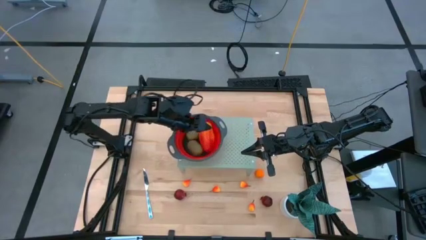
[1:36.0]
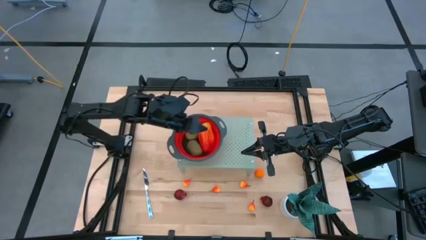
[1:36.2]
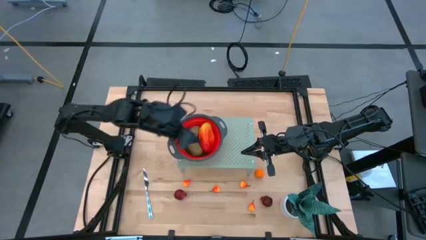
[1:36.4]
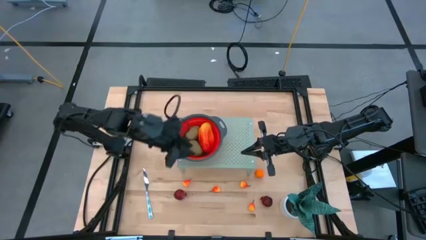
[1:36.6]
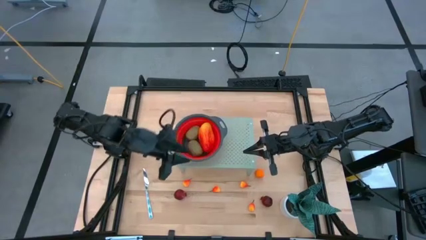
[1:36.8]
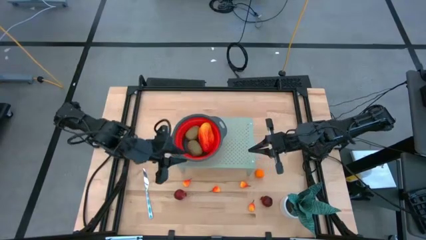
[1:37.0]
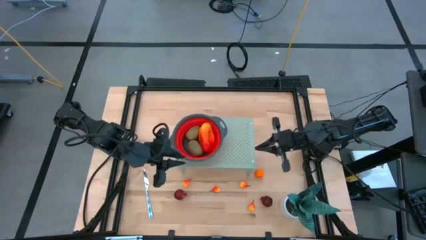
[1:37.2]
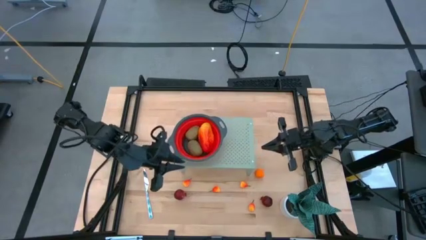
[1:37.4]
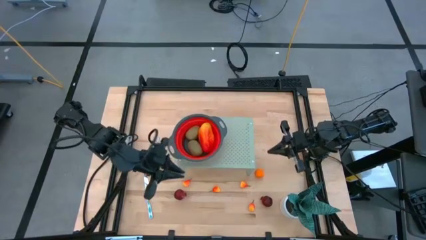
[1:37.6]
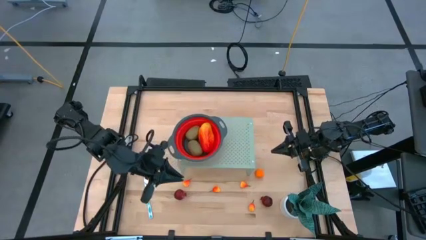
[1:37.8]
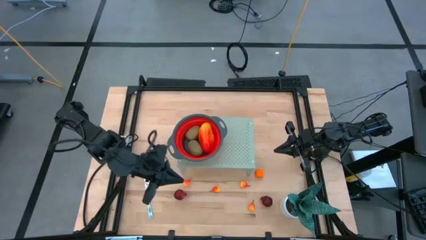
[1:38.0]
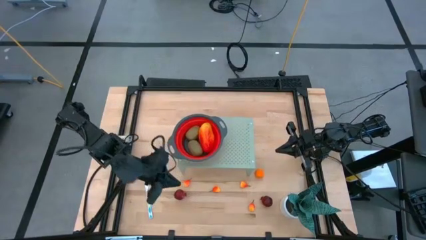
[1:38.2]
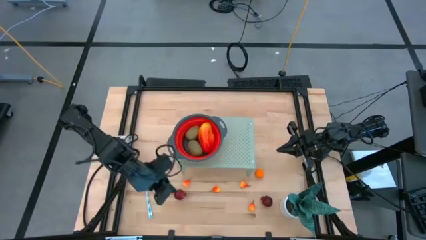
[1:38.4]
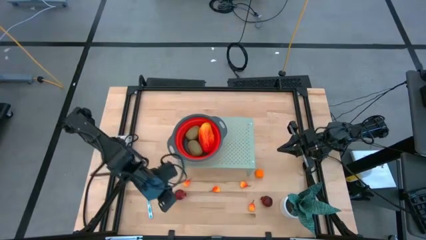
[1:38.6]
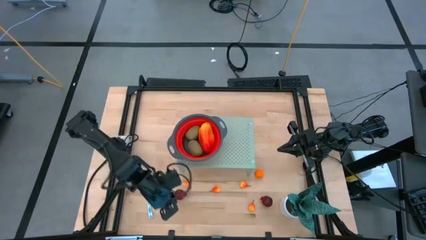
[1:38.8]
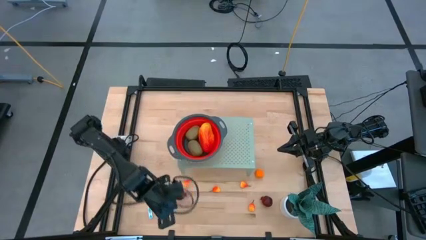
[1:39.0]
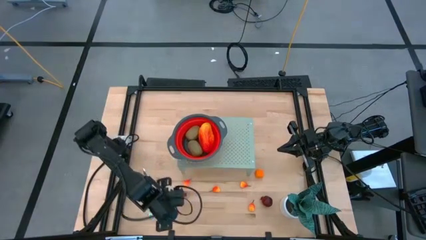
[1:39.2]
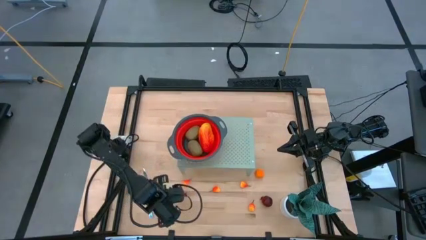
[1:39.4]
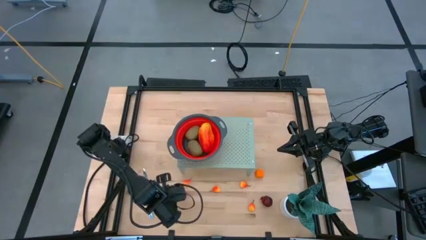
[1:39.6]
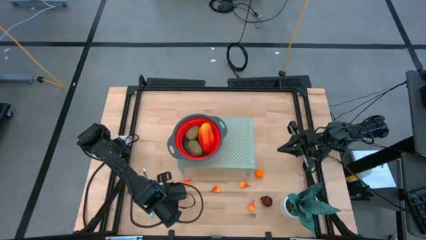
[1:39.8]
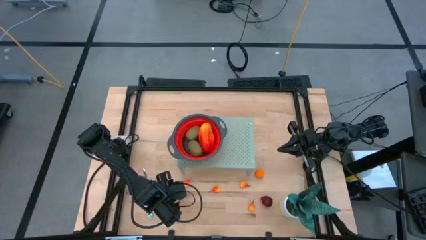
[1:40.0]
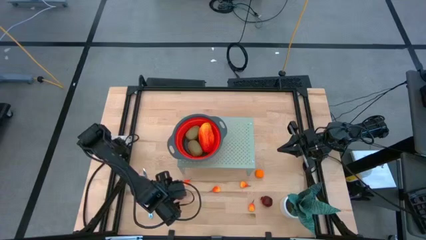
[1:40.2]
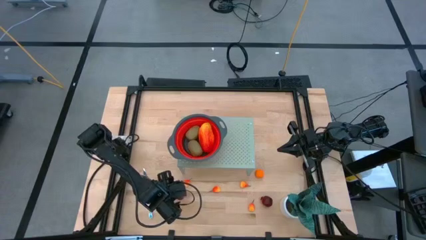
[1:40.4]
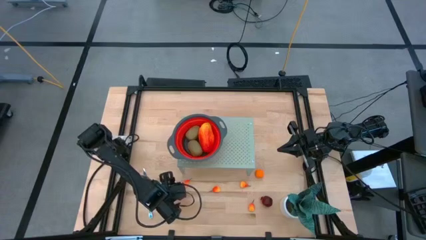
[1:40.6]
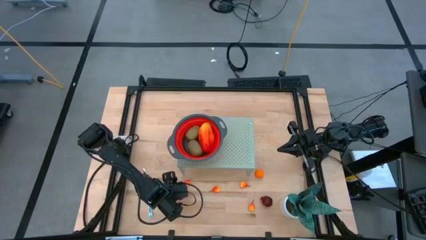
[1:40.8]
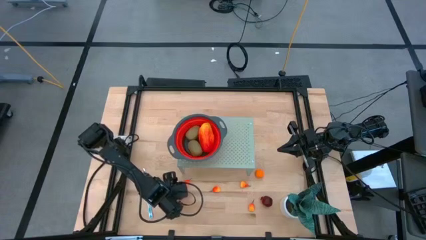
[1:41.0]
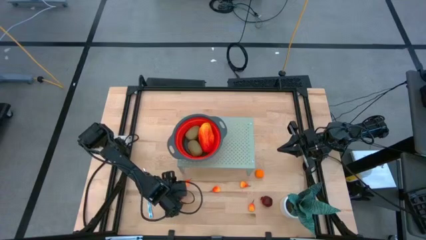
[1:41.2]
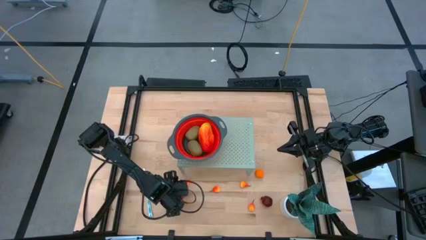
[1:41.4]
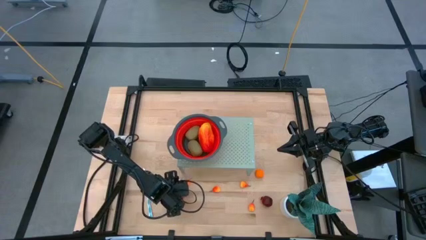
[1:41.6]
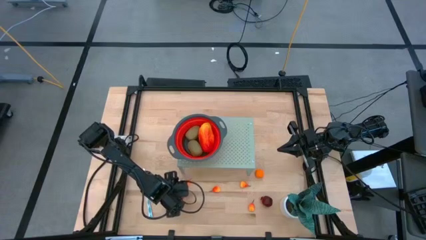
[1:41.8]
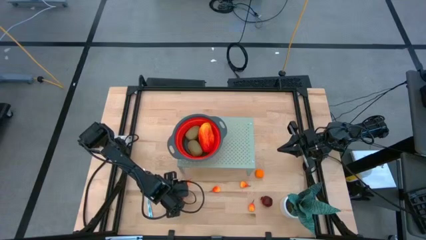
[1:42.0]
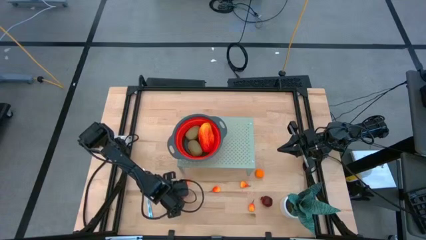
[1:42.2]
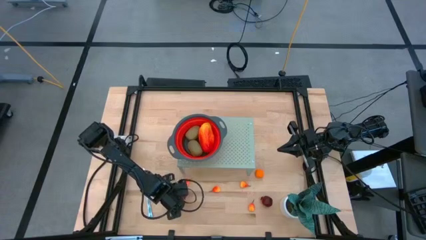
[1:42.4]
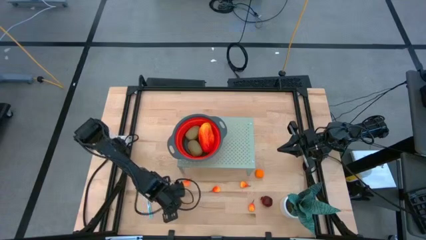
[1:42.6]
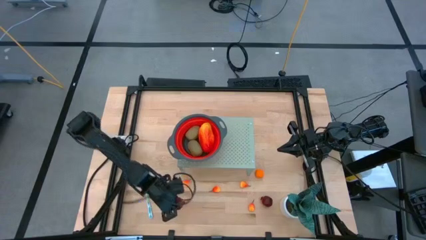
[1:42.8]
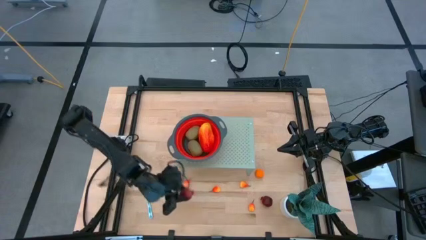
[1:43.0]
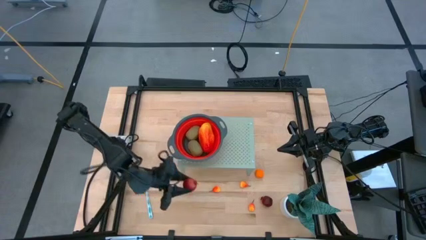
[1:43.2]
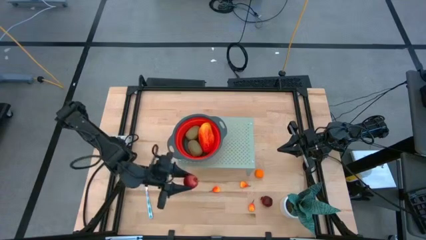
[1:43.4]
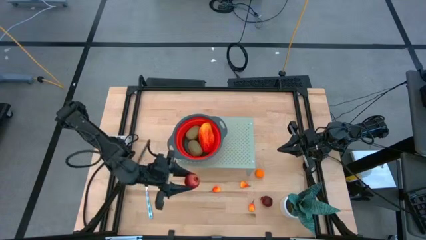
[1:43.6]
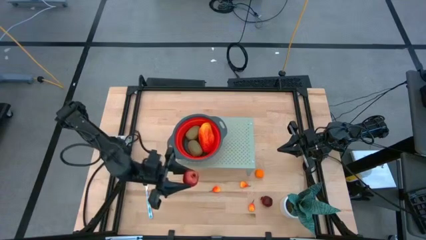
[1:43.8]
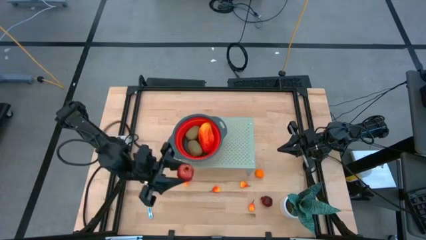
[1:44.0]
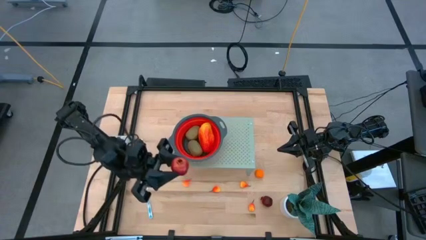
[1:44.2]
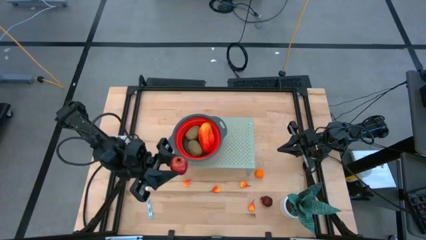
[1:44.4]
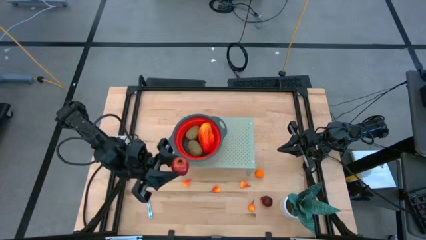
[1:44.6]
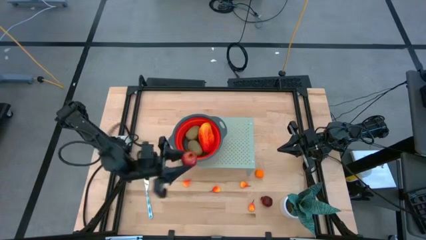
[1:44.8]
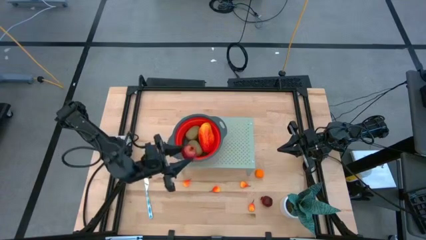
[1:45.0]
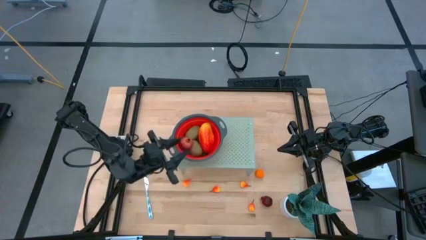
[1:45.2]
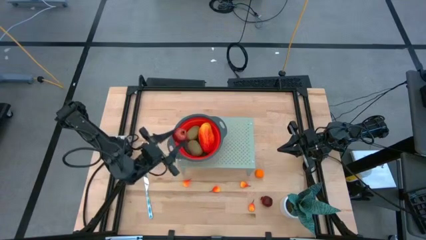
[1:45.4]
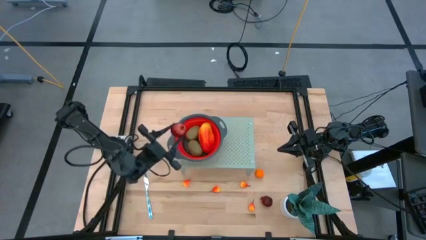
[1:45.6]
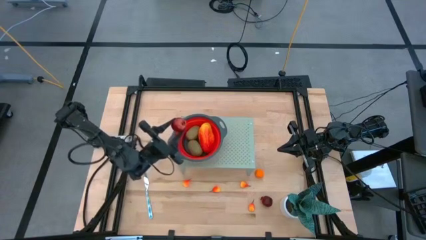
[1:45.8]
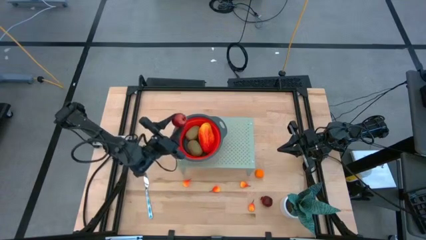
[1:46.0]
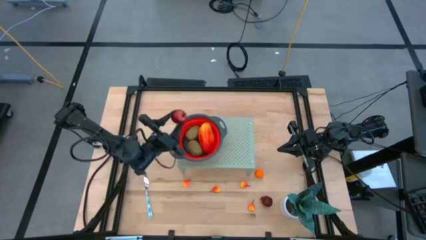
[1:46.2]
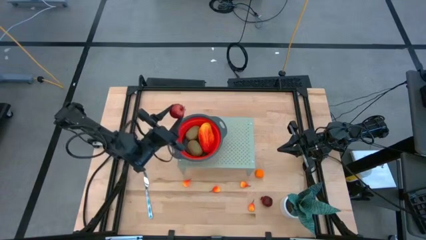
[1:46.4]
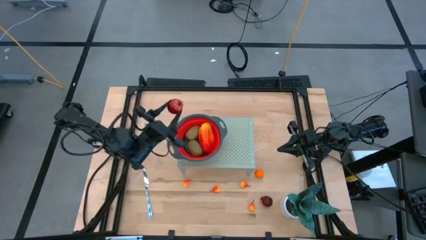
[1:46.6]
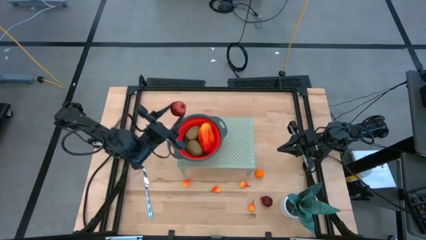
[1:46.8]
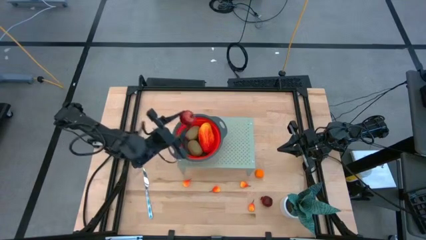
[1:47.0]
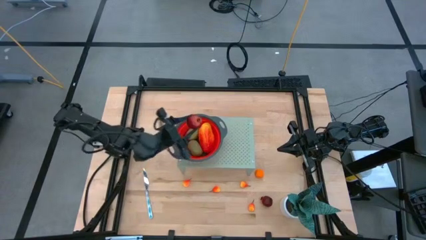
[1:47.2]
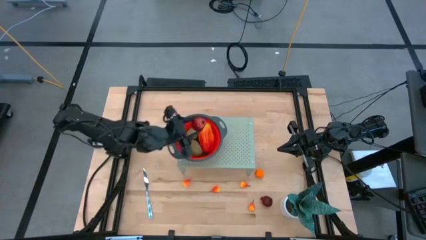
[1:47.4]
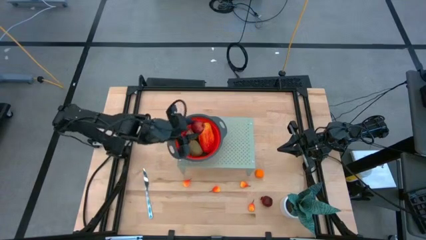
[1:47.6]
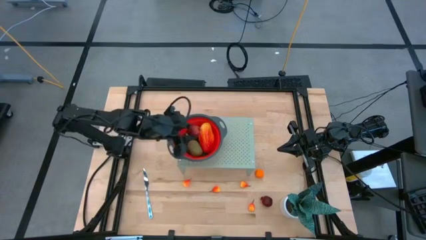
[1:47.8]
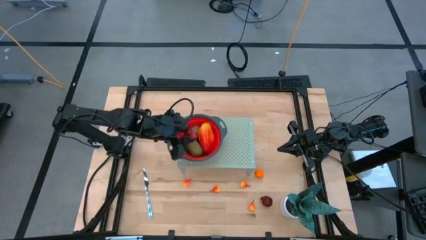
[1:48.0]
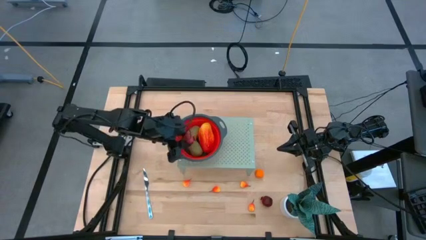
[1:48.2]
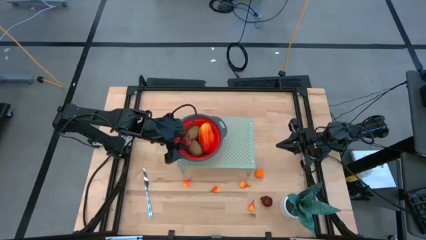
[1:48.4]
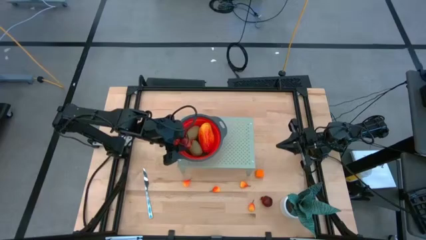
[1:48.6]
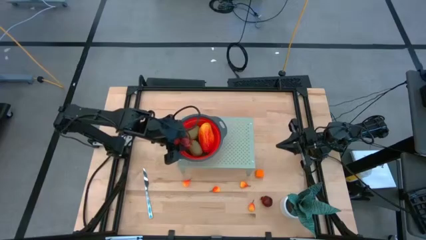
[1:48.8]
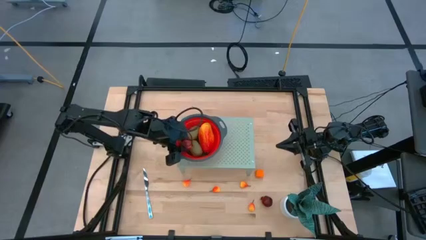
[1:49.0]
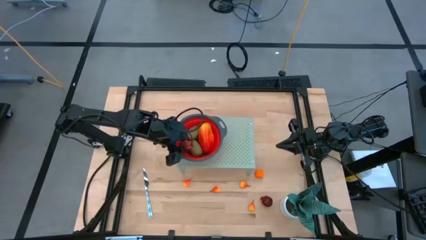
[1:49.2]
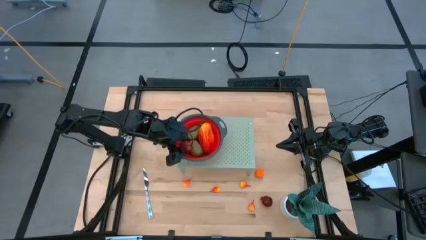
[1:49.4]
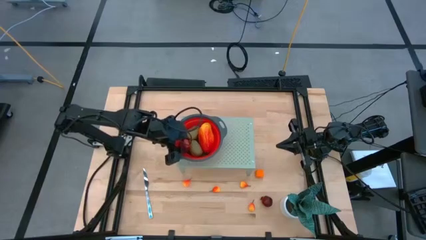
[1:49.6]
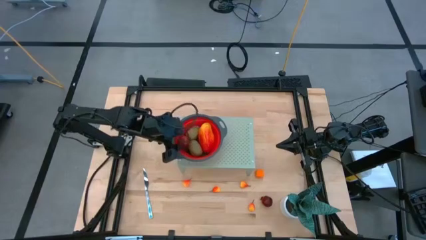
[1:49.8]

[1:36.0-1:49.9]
Task: Pick & Place Fruit
Put the pomegranate fruit into the strainer
